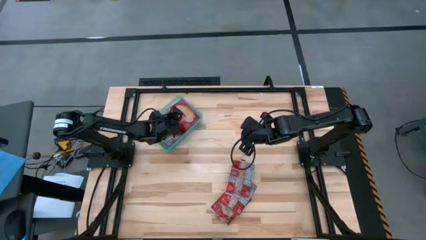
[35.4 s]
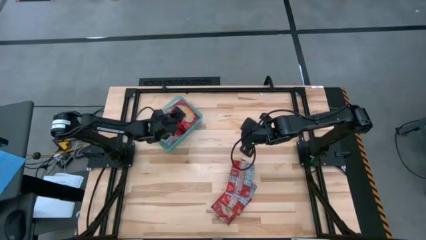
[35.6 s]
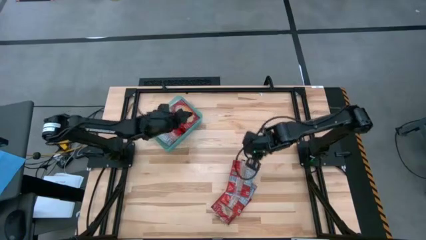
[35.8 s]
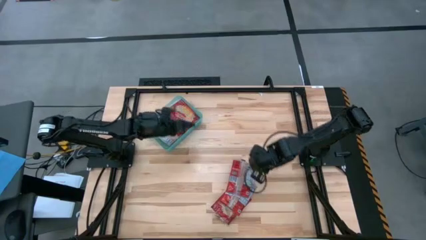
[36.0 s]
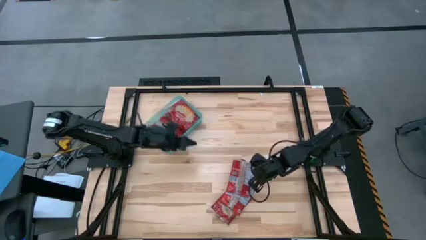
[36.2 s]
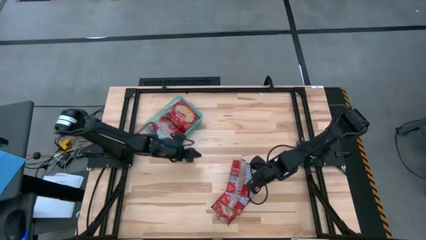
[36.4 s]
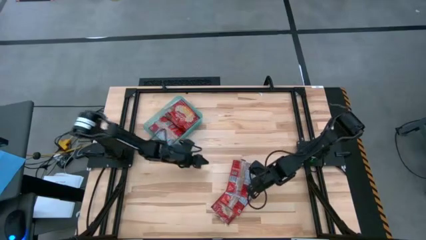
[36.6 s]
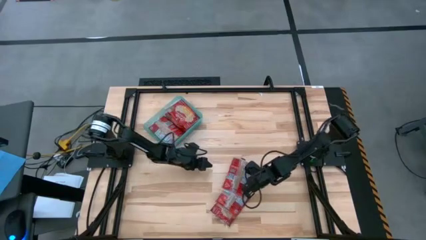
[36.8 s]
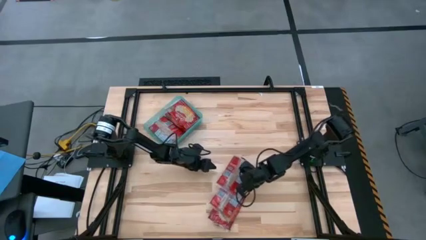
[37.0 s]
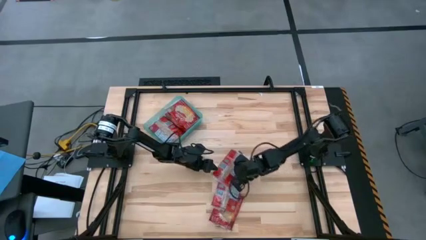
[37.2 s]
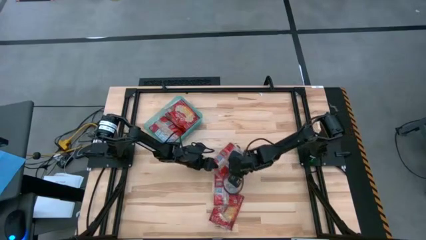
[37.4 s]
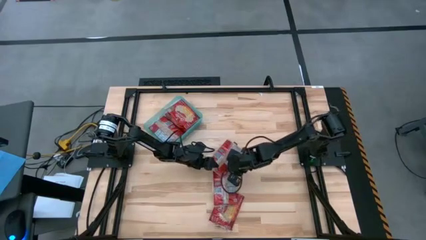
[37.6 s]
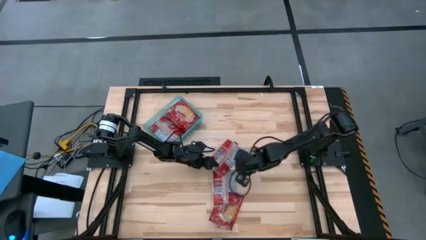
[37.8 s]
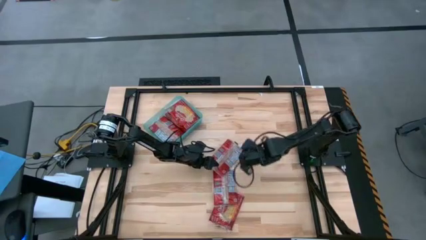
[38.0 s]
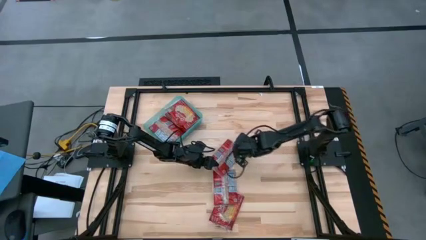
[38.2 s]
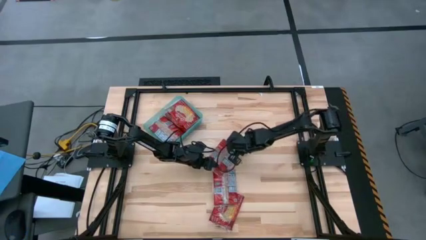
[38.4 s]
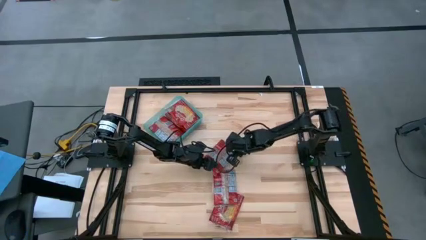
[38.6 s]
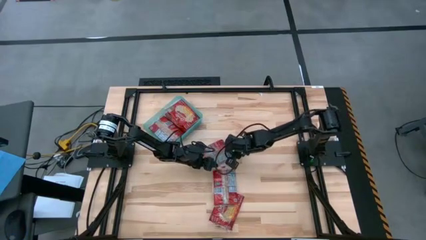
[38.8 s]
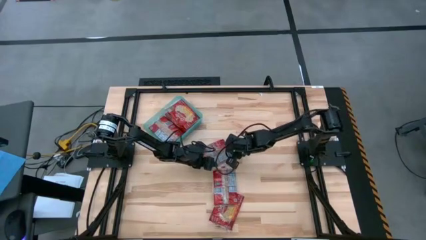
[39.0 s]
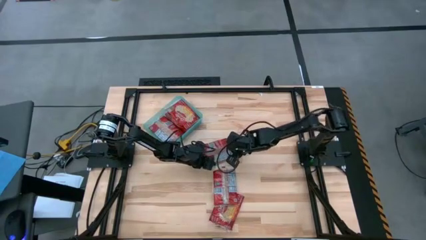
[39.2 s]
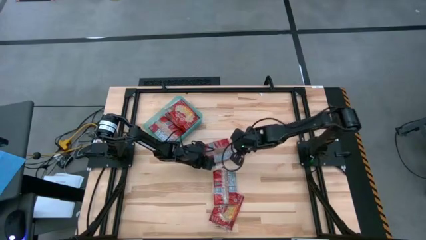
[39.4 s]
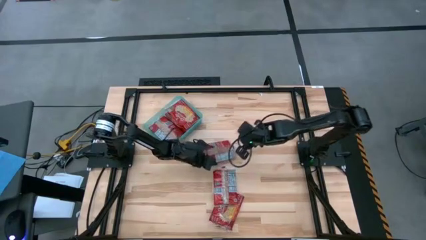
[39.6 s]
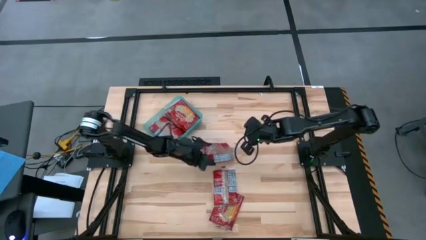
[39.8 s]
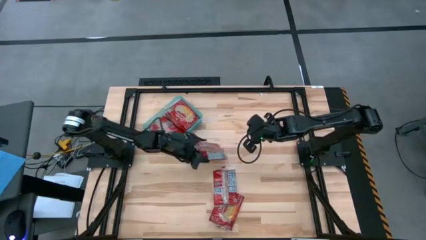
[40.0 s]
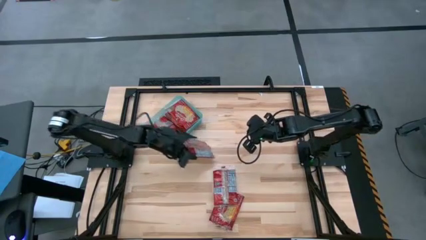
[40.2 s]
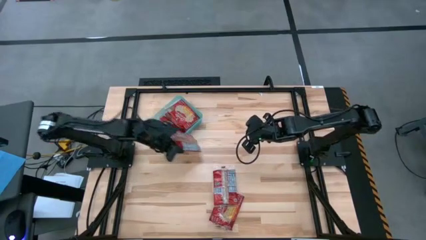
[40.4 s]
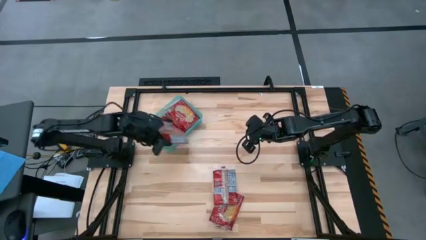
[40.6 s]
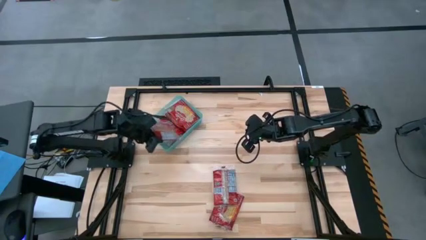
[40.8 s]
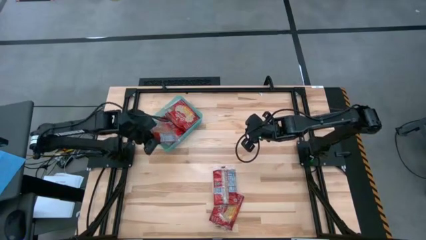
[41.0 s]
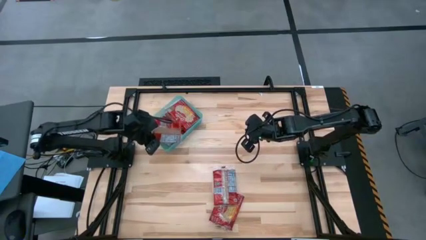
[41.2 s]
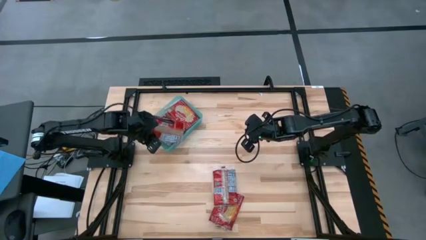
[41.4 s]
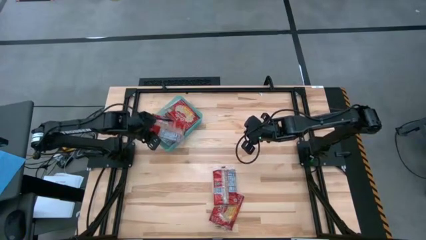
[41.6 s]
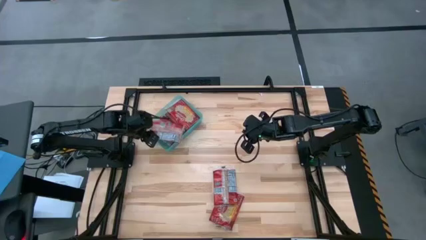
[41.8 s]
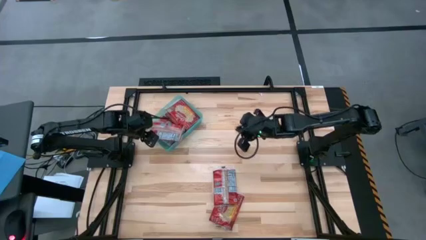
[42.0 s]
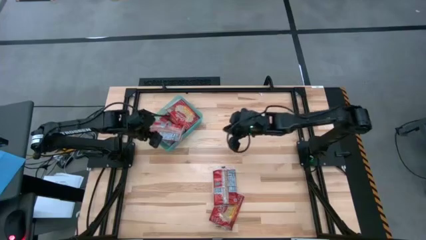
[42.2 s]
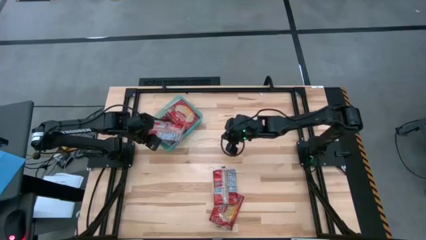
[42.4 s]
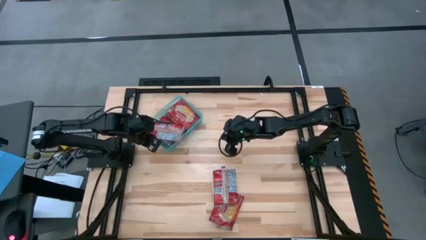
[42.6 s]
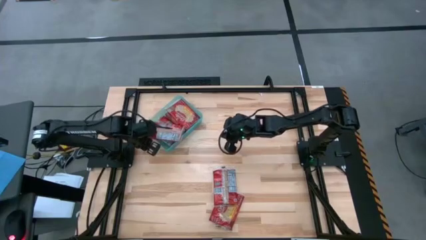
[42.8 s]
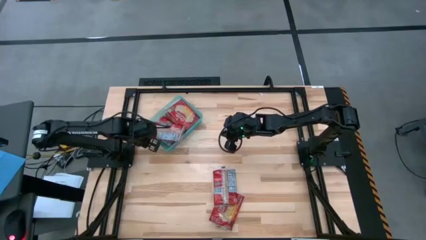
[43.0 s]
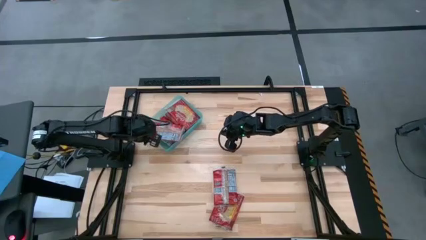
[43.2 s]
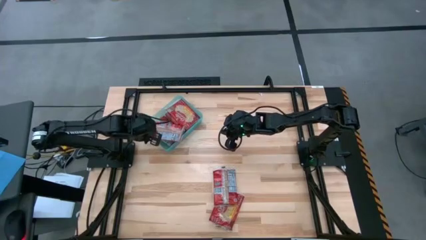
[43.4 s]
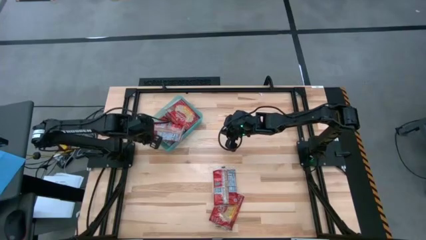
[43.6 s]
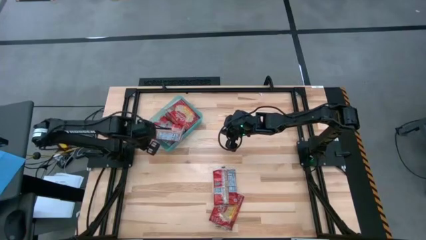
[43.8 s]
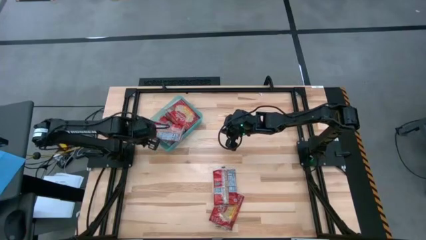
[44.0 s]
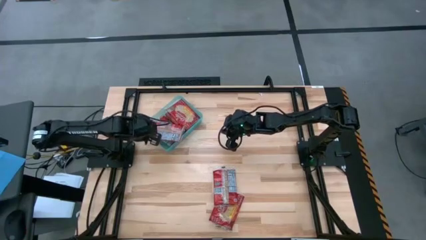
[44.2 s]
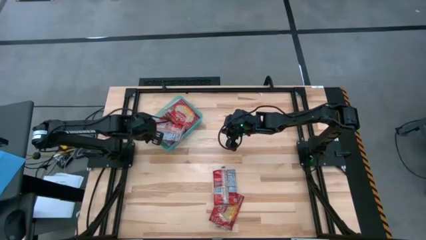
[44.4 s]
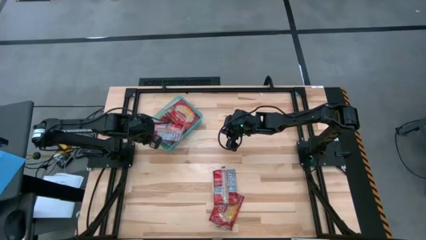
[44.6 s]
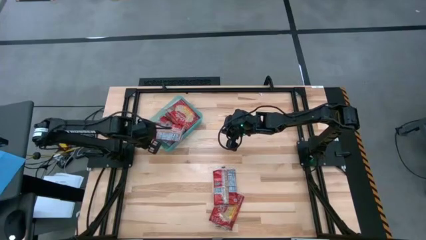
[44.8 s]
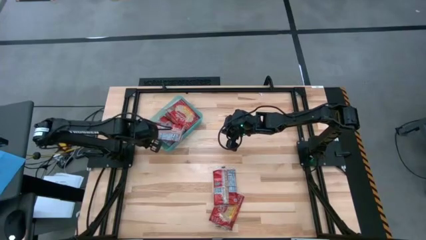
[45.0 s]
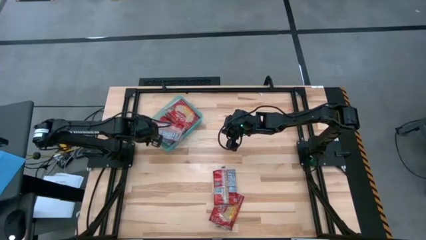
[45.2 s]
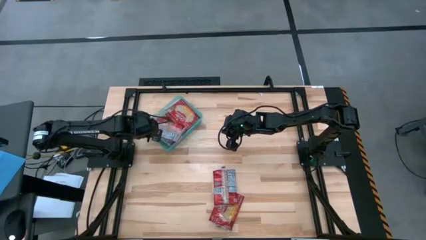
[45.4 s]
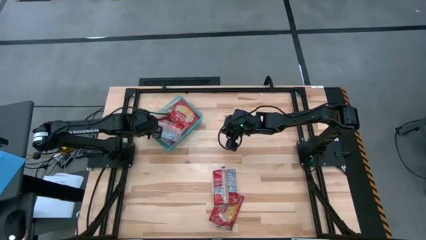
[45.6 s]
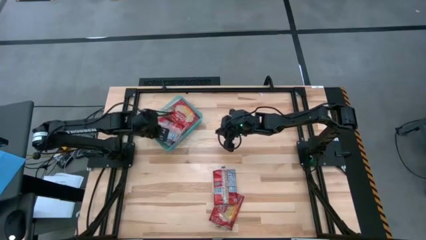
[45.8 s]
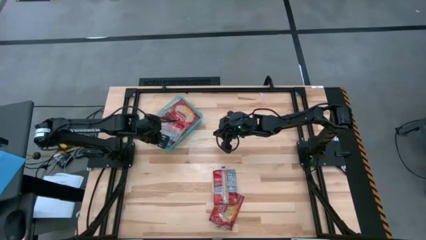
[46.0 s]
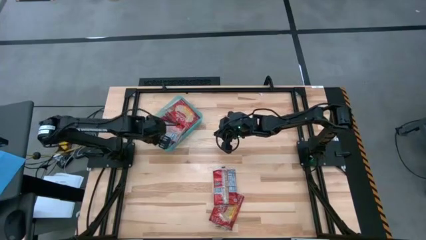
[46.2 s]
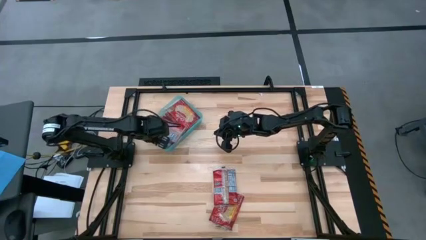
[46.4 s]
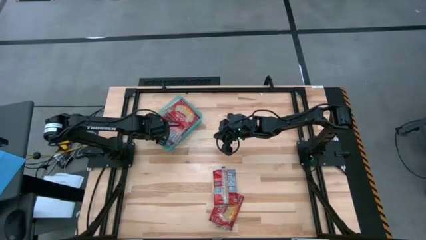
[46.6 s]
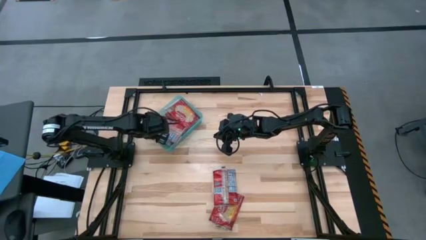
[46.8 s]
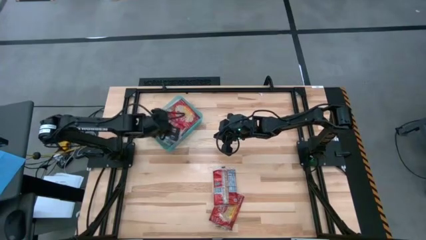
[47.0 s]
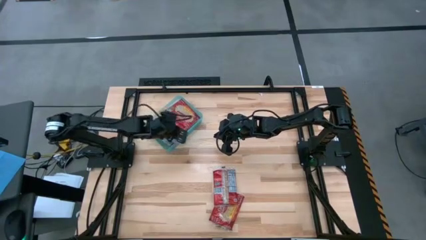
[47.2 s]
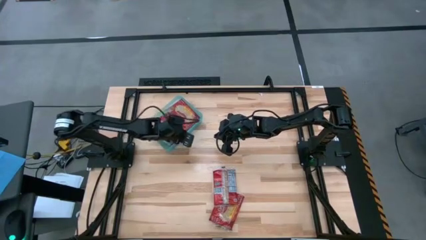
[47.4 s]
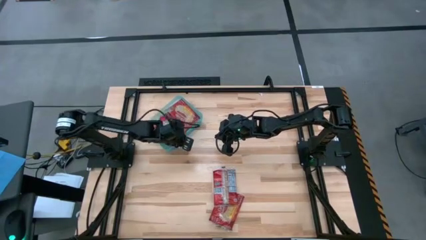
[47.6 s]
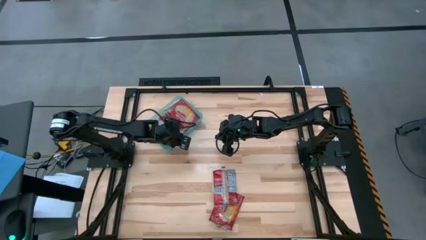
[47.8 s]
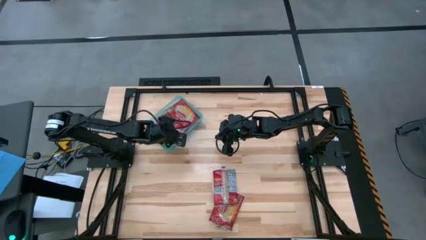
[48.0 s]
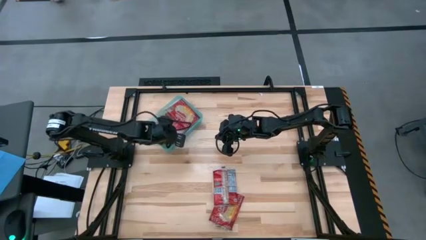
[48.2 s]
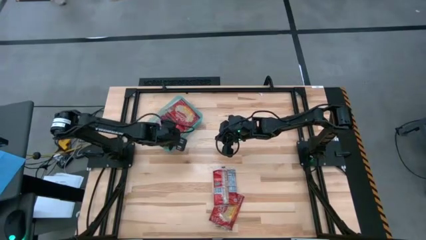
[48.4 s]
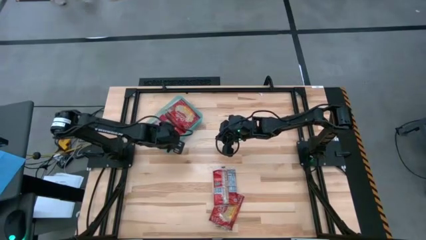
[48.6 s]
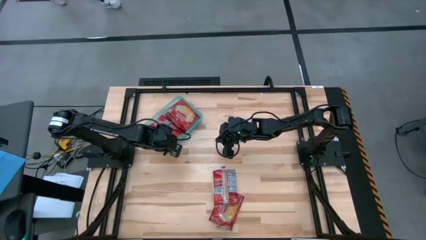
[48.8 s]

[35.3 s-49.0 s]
Task: Sort popcorn bags into baskets
Put the red popcorn bag into the blue bin

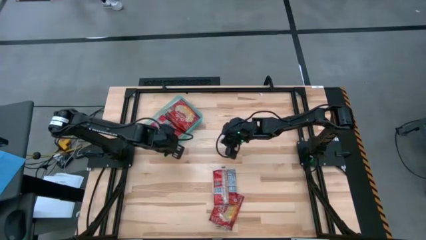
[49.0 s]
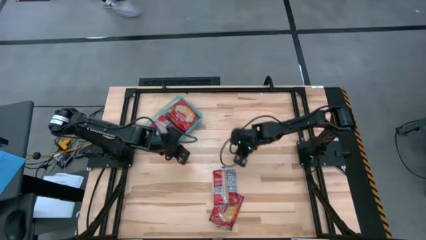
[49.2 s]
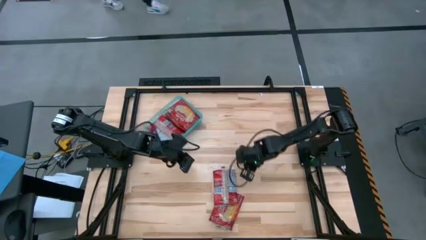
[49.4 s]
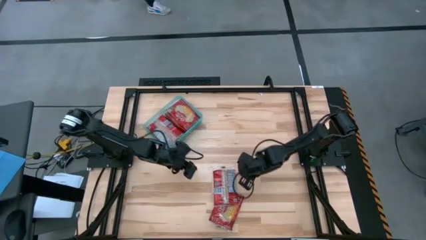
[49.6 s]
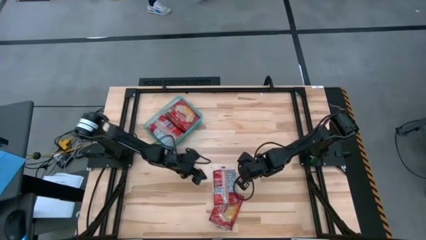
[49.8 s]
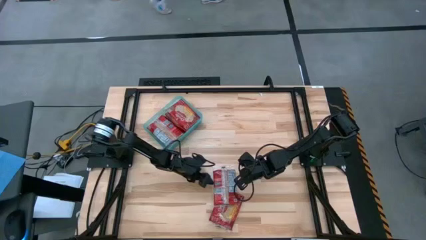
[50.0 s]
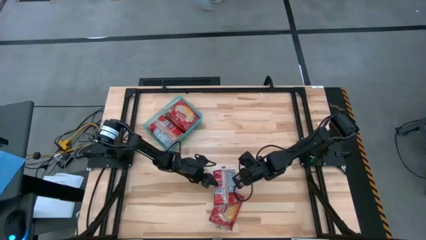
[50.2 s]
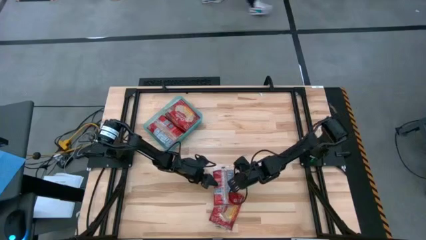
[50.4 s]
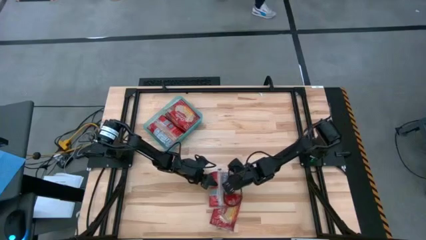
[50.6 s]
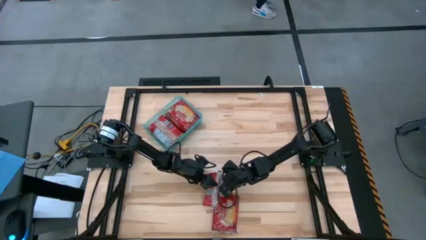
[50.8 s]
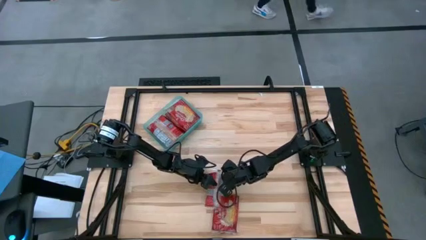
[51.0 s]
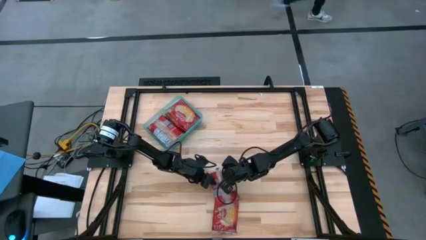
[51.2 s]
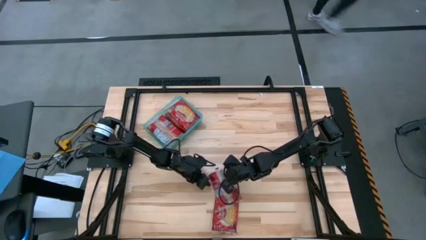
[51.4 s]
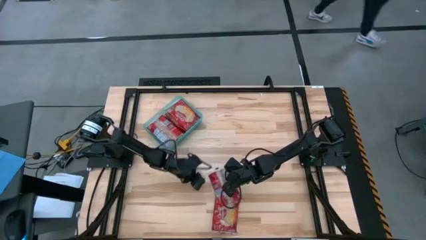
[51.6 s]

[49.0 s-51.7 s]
Put the red popcorn bag into the blue bin

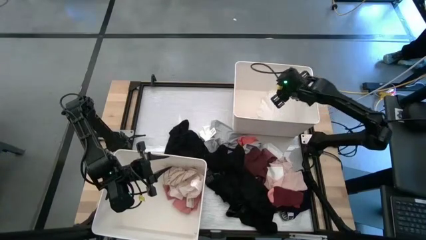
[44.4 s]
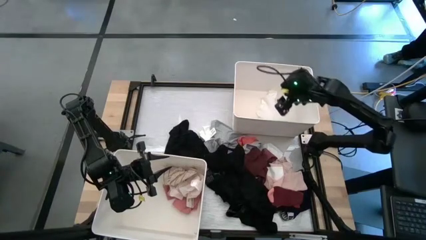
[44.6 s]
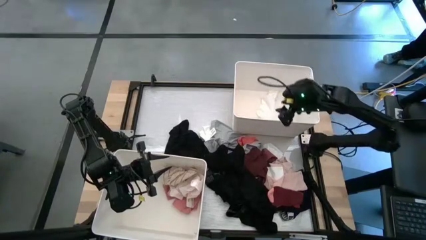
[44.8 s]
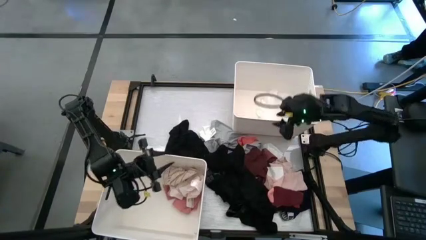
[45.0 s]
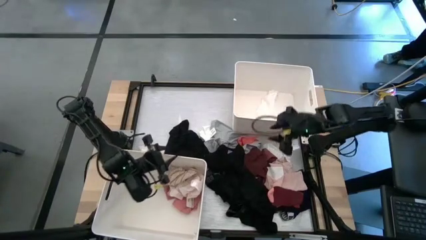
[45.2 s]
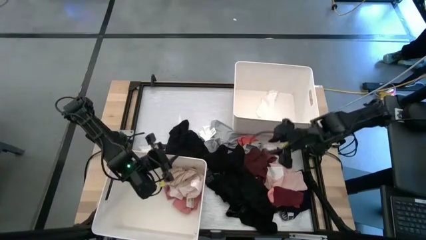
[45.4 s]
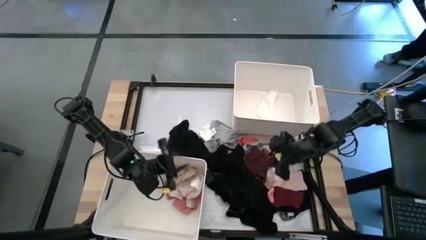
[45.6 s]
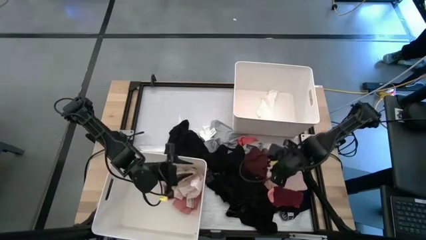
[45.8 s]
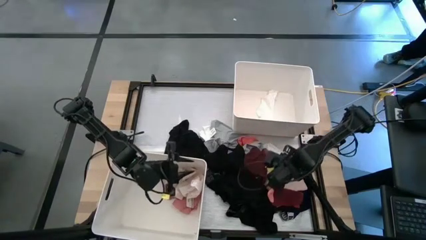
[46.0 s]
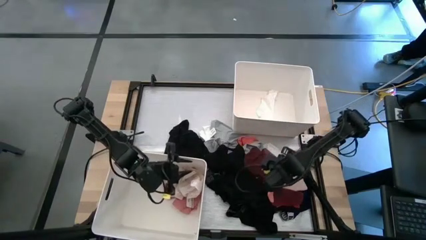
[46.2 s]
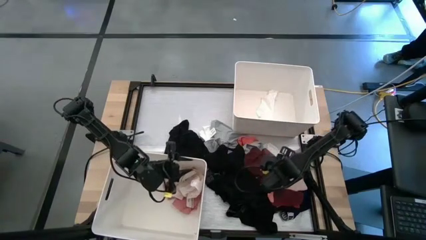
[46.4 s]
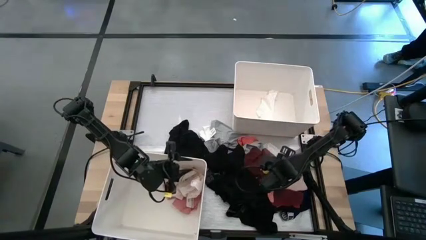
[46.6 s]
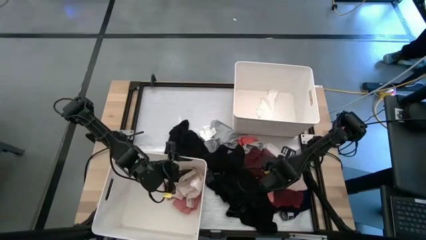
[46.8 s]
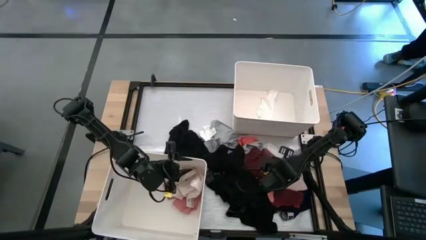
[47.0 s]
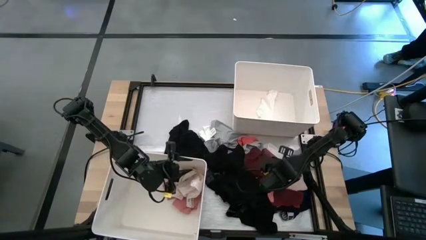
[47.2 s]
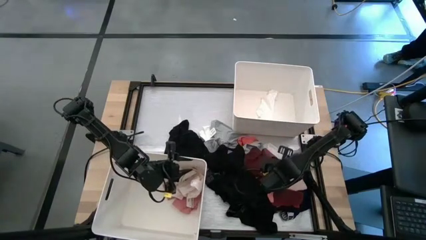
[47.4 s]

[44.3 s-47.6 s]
Task: Sort clothes
Put the white shirt into the top white bin
